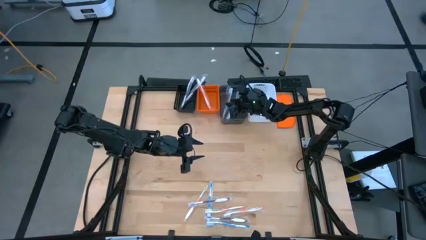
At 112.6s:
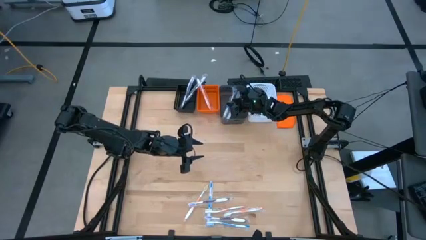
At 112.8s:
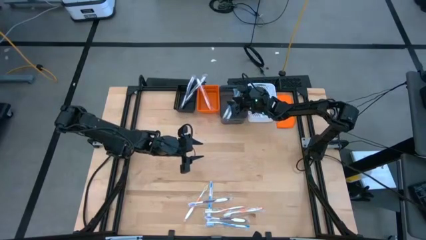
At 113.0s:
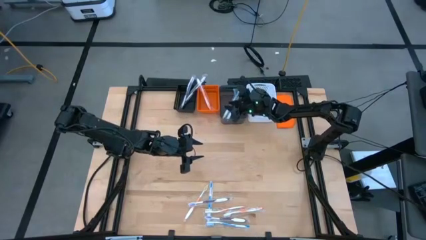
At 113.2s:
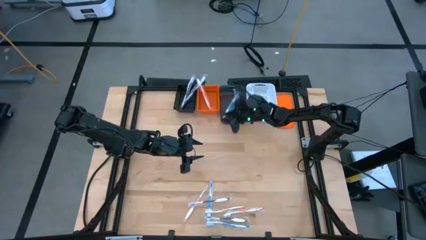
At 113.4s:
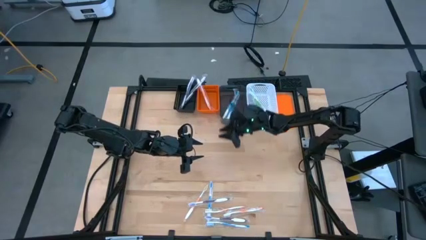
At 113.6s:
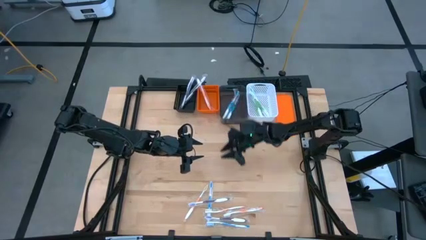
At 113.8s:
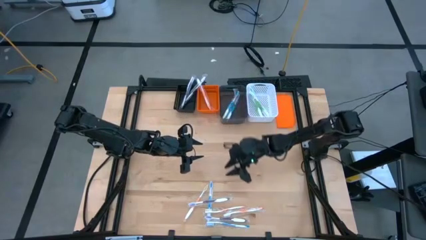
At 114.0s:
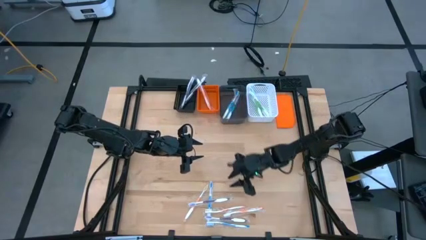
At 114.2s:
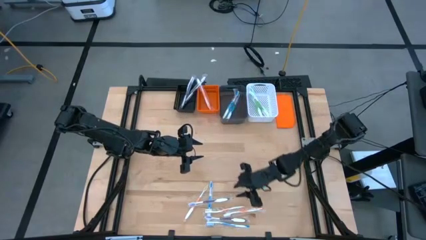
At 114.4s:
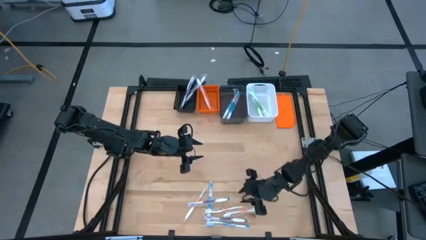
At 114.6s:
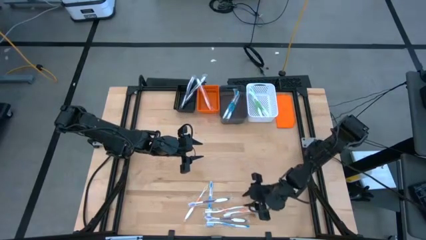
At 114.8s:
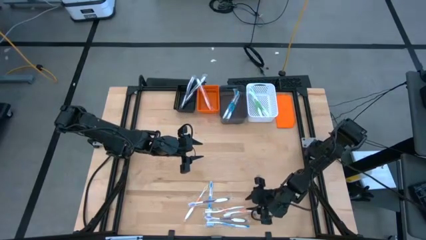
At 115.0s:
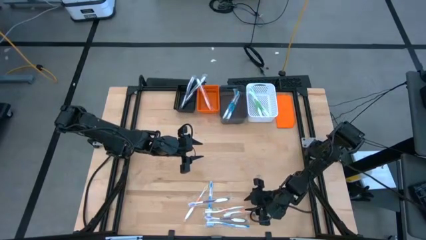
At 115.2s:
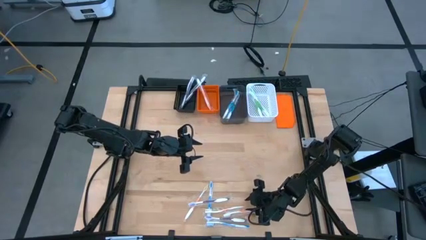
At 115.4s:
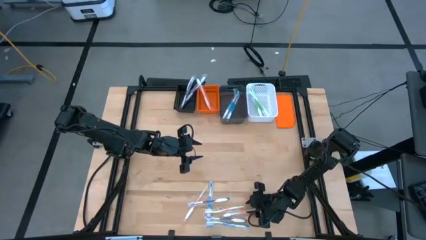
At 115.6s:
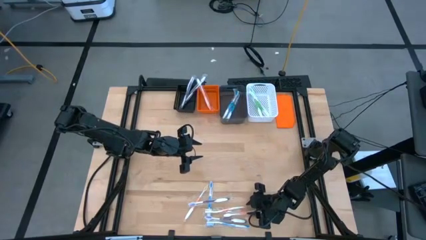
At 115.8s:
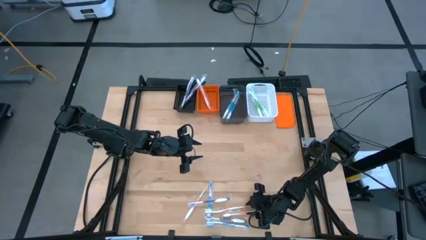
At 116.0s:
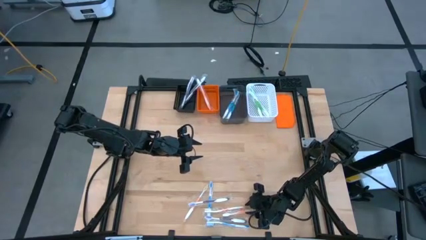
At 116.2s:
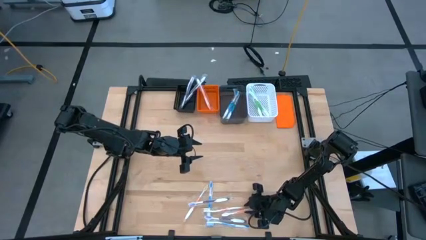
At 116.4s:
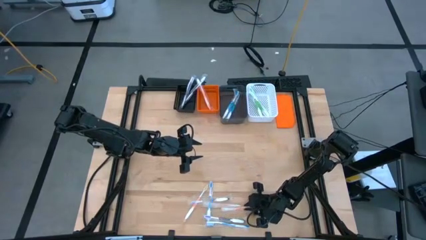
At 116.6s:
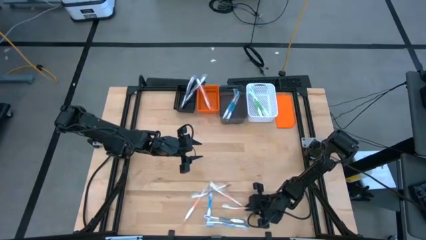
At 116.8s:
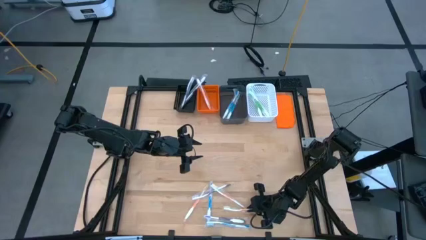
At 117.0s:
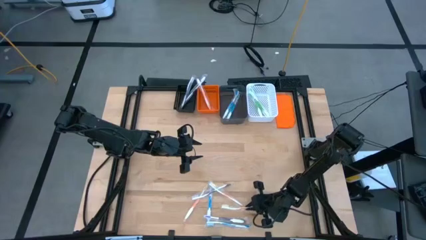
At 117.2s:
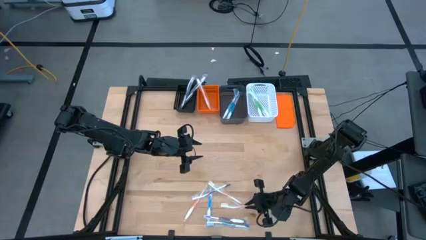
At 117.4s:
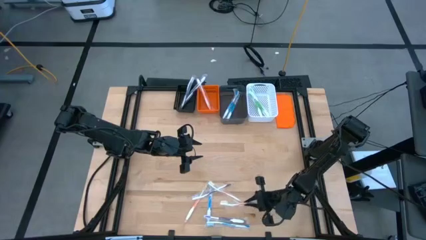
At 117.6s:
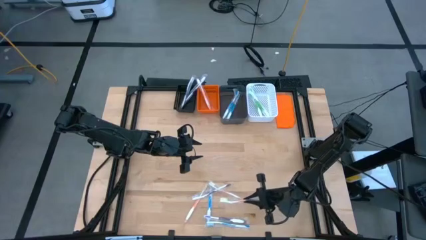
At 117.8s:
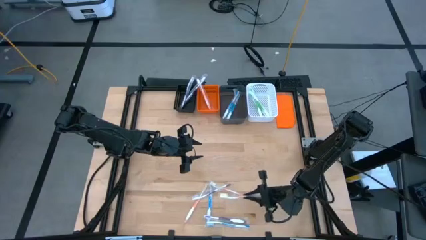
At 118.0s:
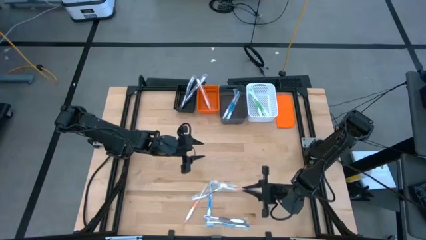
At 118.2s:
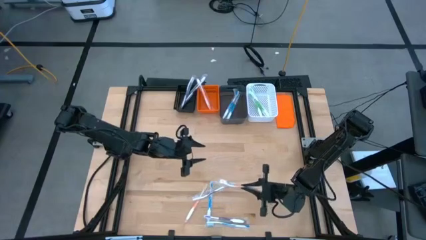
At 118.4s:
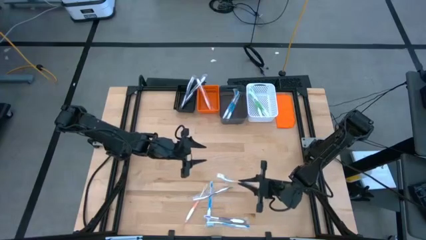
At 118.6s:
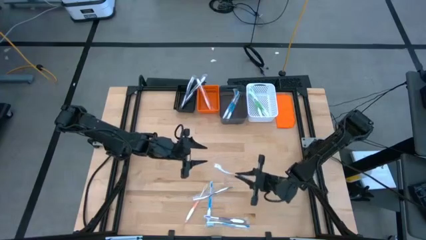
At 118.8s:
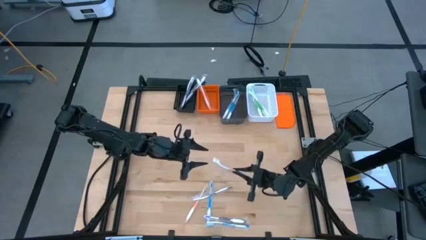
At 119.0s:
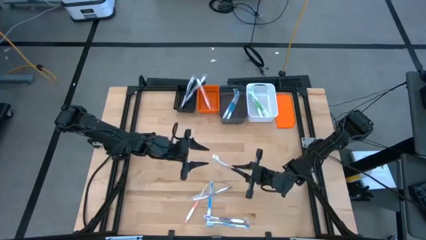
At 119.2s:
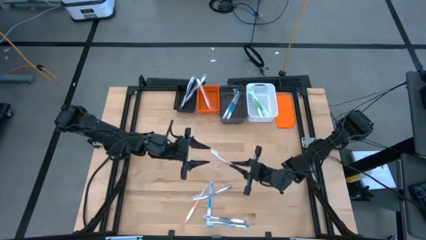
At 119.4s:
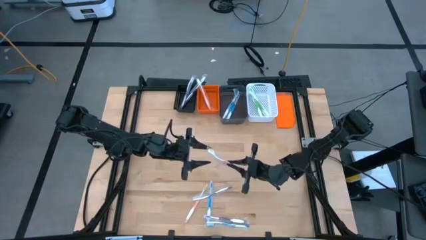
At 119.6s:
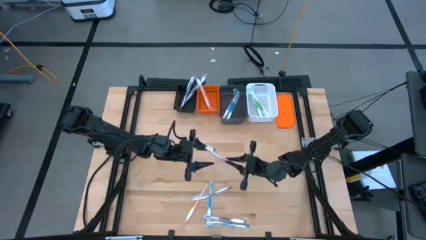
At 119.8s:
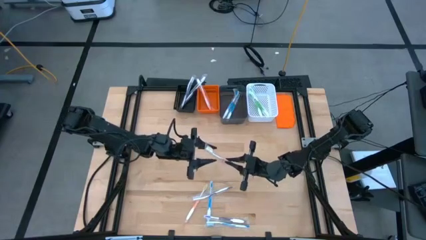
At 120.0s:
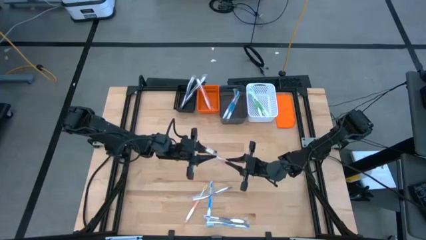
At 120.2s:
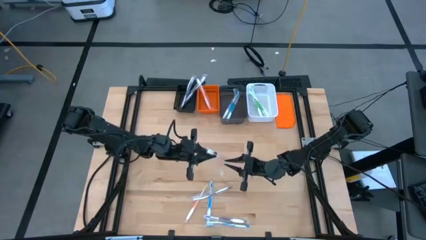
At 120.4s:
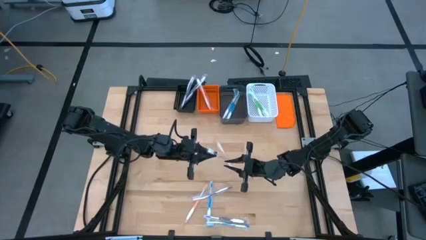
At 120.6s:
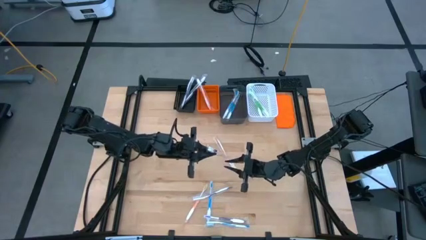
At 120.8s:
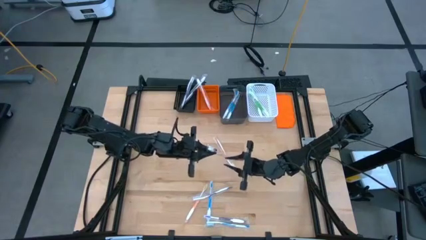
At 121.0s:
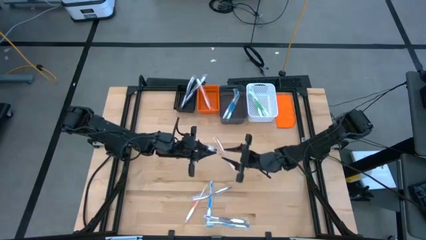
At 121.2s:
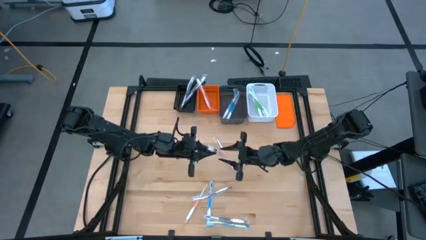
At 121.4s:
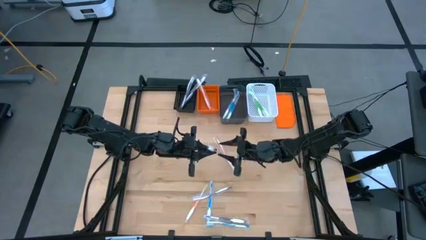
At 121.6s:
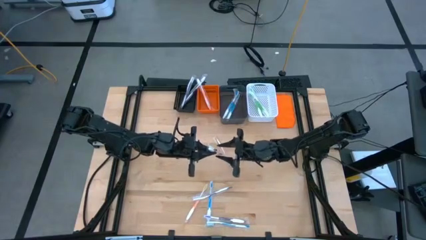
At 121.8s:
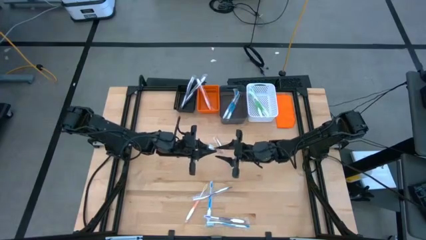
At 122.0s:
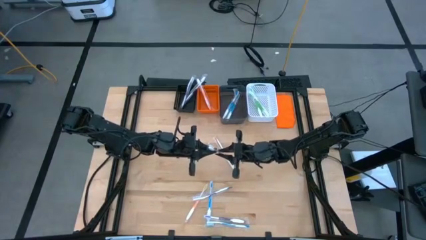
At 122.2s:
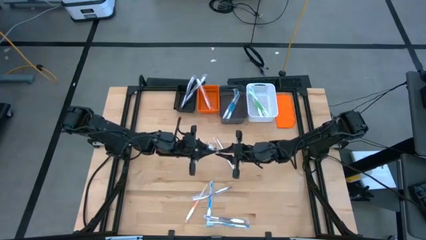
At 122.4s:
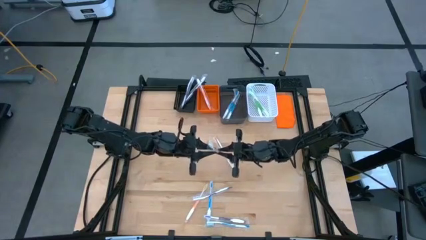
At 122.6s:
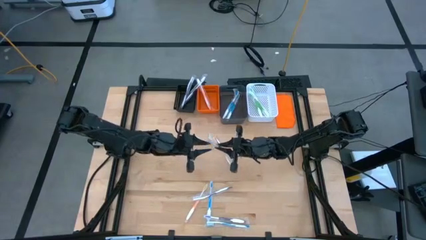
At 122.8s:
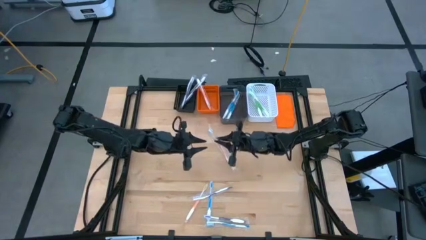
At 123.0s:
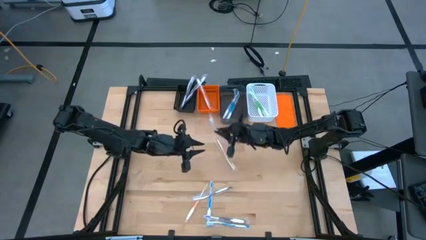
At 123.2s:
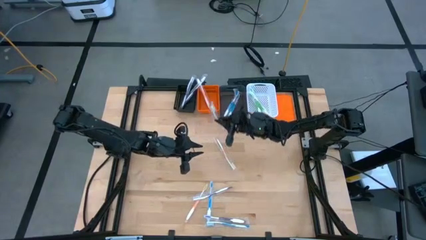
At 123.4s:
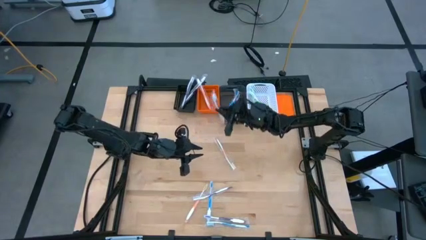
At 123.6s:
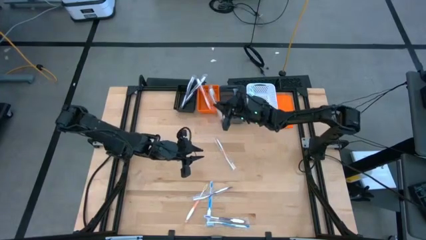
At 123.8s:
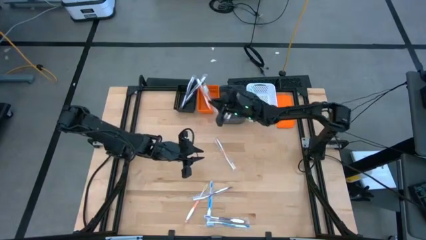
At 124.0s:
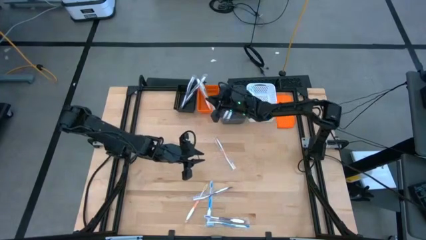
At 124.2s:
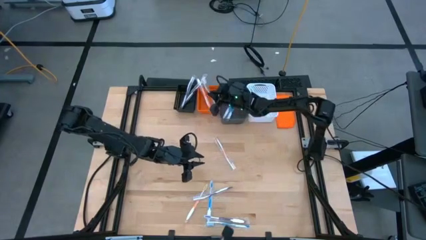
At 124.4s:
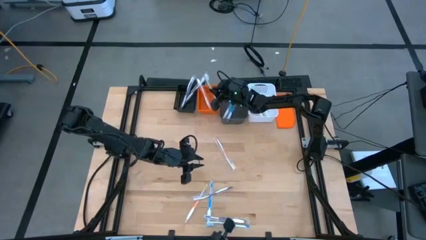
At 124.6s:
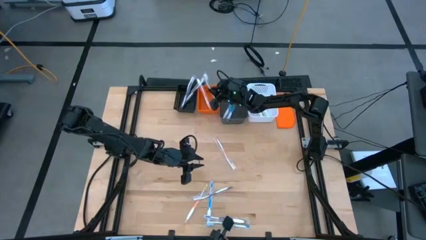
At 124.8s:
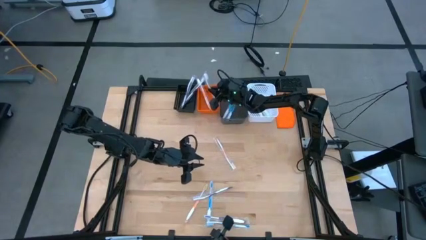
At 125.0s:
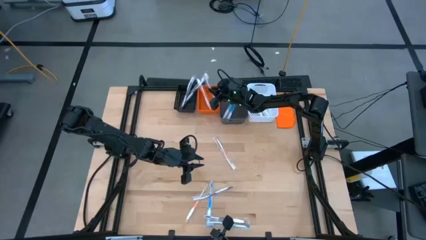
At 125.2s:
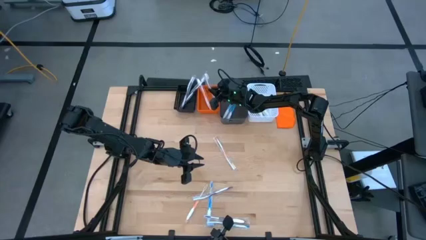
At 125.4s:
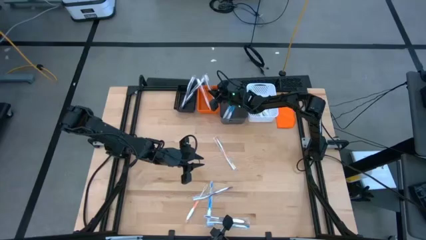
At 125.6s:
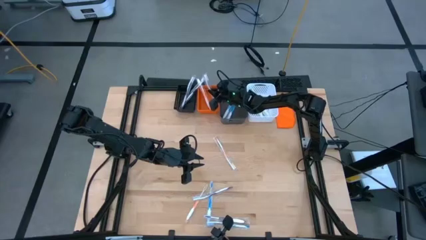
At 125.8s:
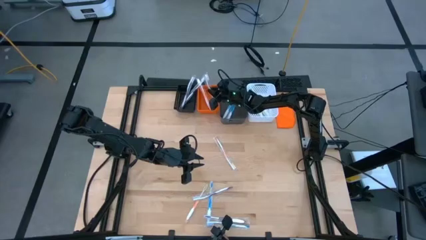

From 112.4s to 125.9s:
Task: Pick & Place Toothbrushes
Put the orange toothbrush into the orange basket

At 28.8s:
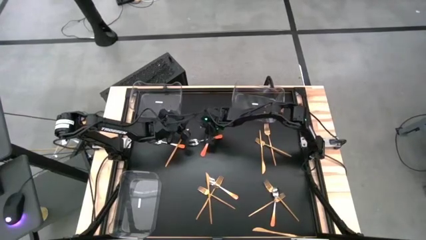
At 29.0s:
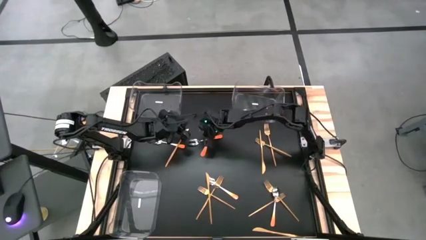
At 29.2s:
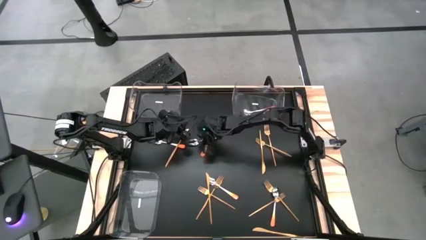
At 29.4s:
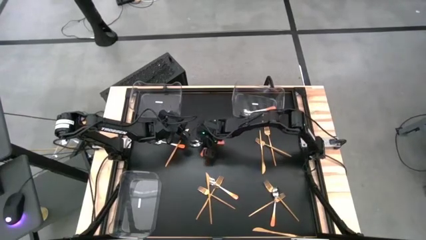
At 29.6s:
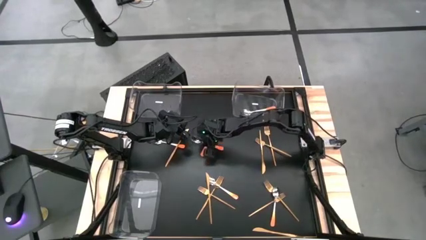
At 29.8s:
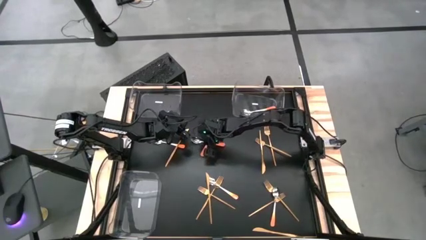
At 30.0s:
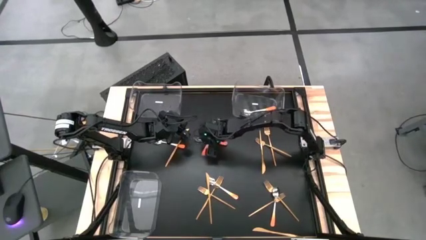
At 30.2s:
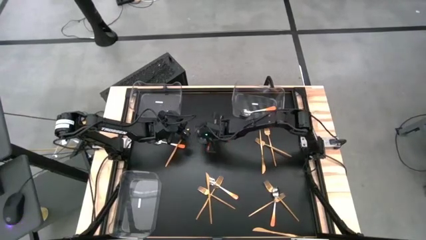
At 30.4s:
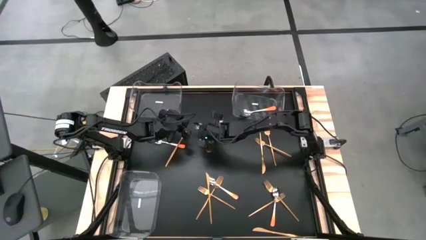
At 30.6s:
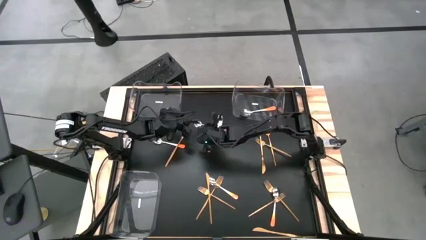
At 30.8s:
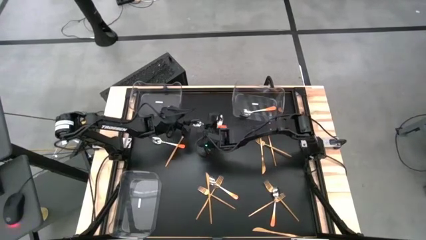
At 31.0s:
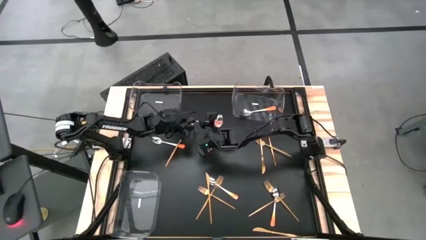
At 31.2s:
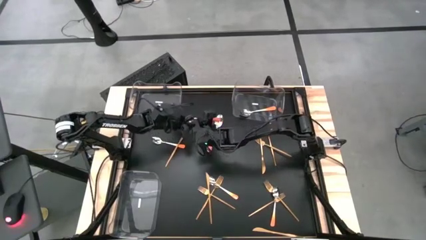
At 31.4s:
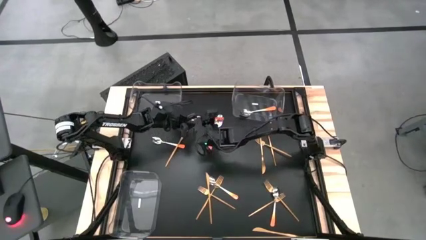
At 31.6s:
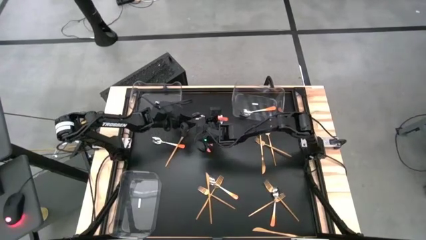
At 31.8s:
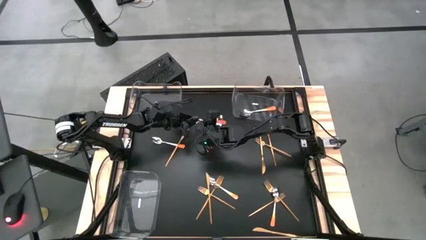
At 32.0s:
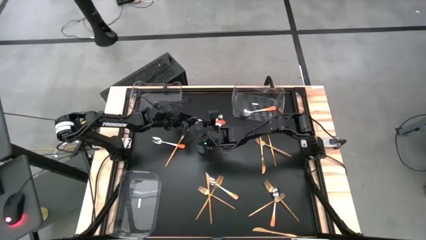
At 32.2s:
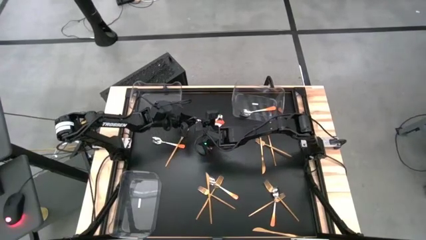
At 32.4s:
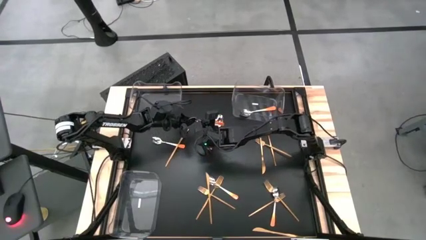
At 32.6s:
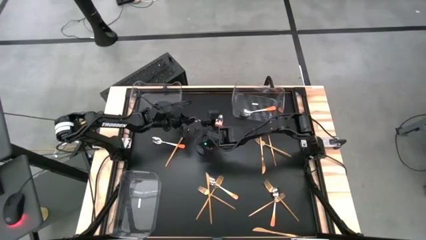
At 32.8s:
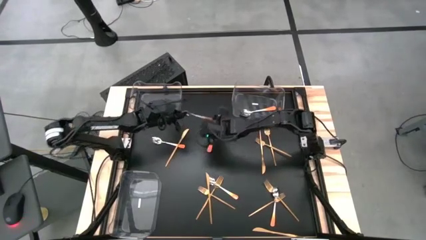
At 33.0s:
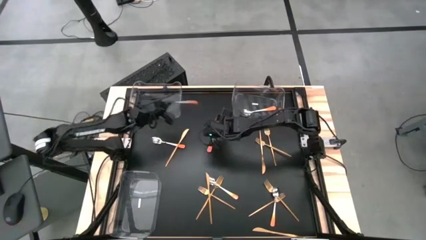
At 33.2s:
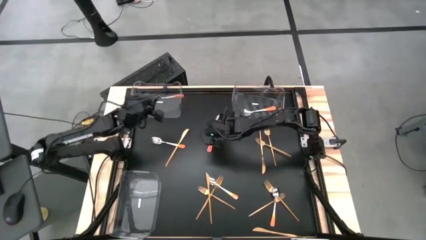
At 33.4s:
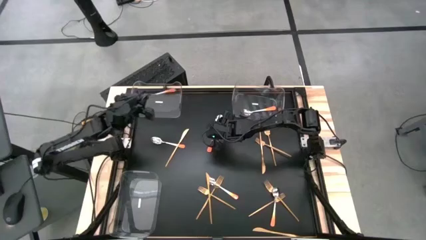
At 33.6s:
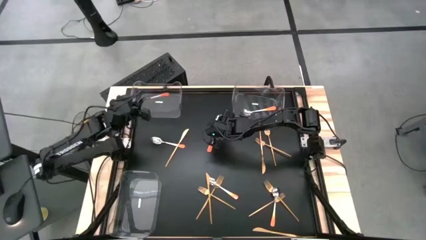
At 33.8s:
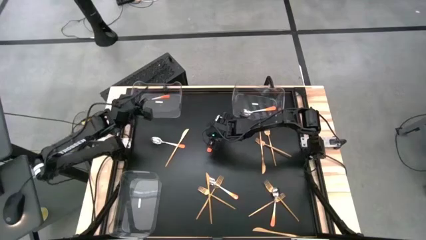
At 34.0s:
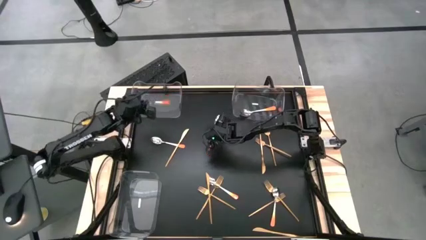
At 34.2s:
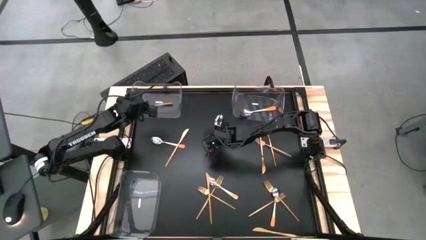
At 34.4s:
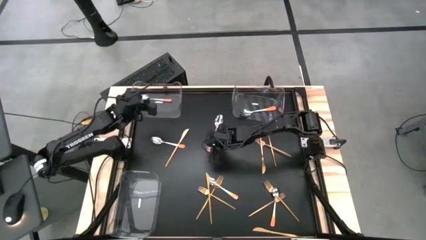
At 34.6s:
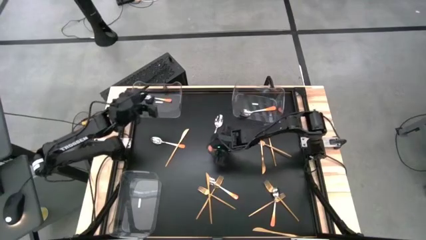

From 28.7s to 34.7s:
Task: Sort silverware by color (type)
Put the silver and orange spoon into the top left transparent bin
